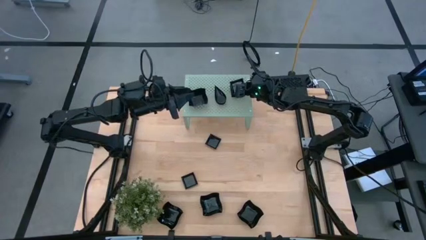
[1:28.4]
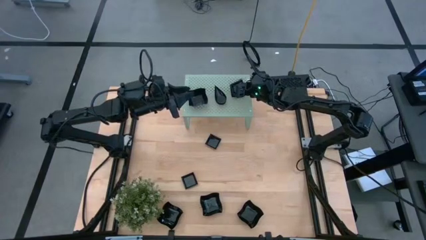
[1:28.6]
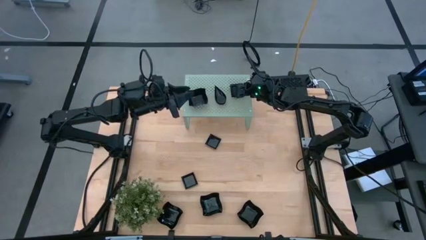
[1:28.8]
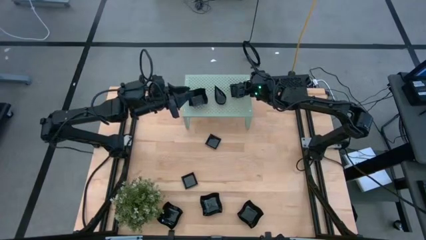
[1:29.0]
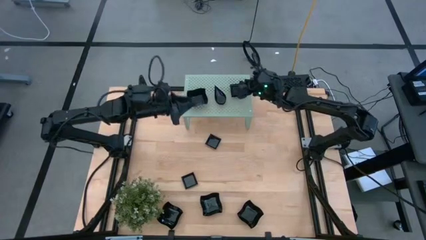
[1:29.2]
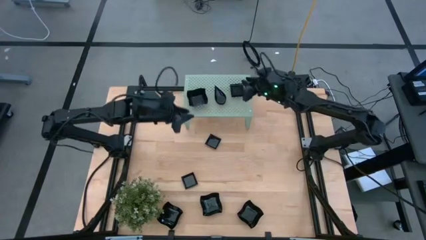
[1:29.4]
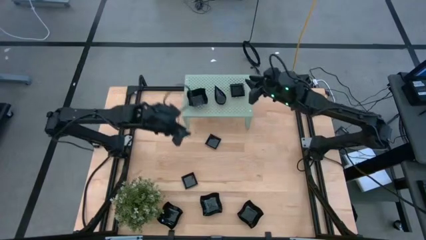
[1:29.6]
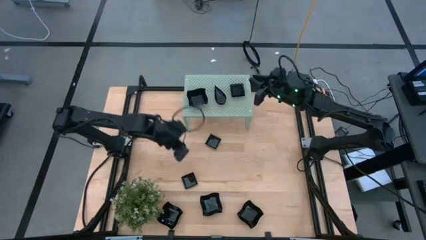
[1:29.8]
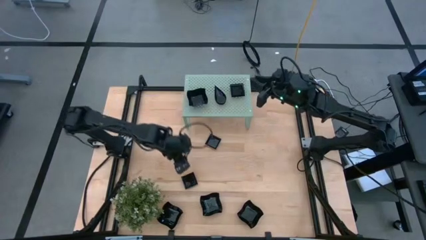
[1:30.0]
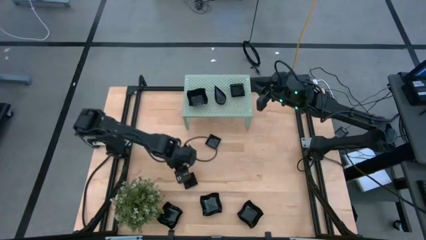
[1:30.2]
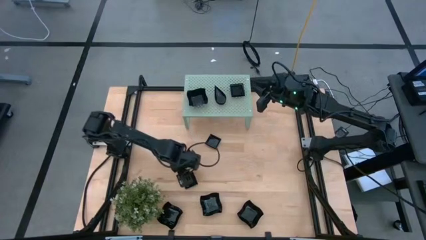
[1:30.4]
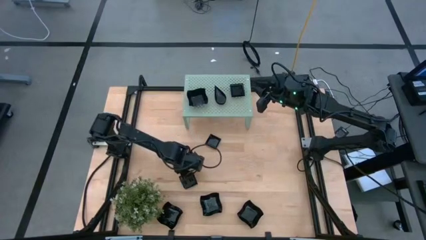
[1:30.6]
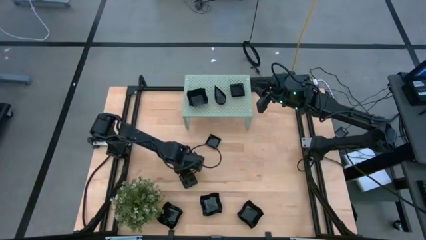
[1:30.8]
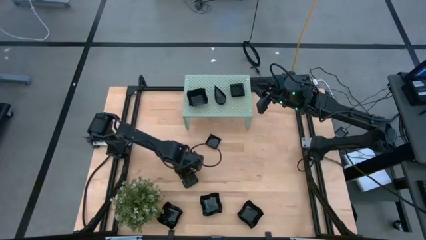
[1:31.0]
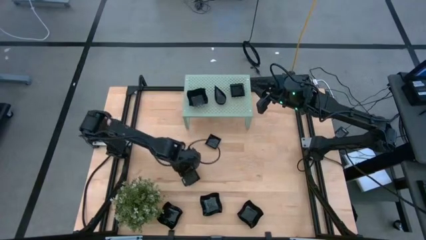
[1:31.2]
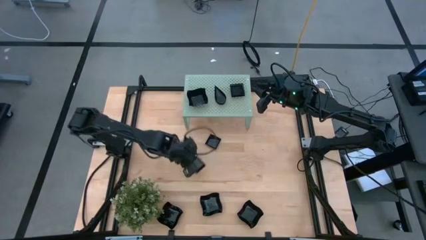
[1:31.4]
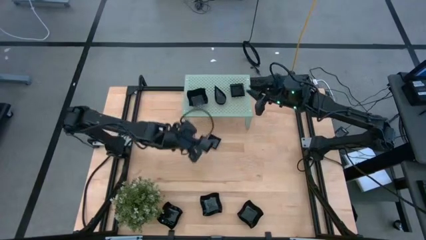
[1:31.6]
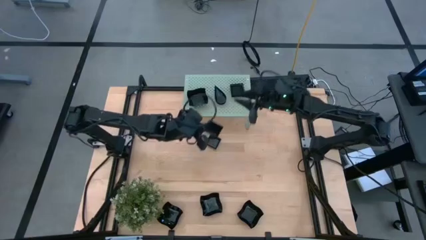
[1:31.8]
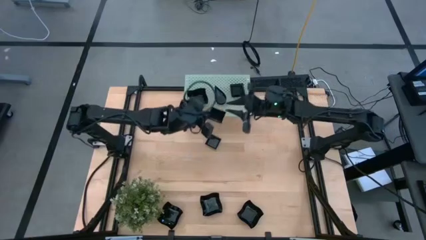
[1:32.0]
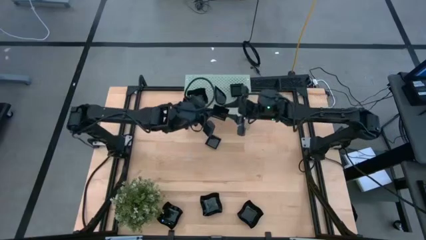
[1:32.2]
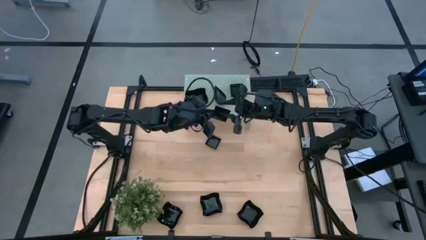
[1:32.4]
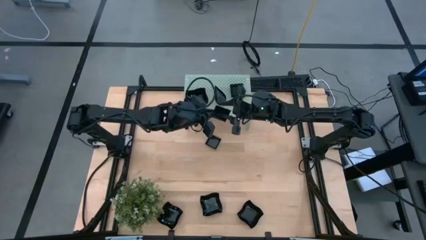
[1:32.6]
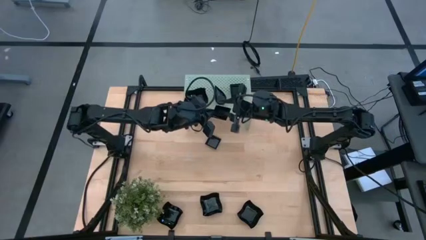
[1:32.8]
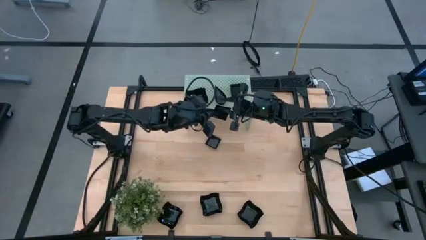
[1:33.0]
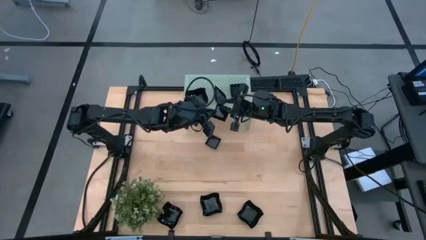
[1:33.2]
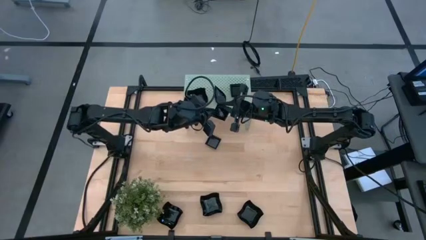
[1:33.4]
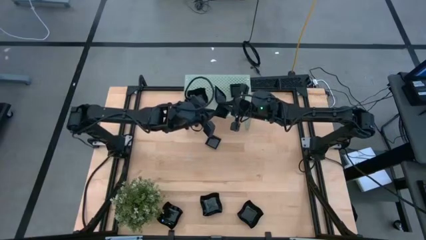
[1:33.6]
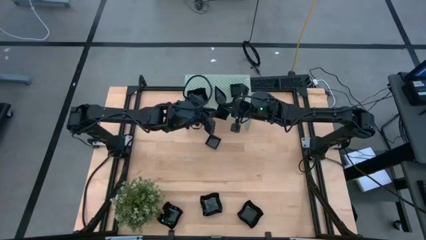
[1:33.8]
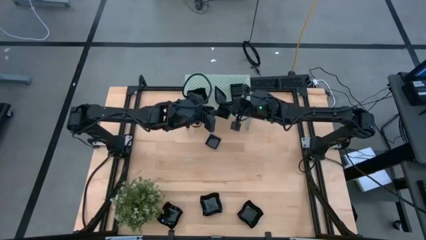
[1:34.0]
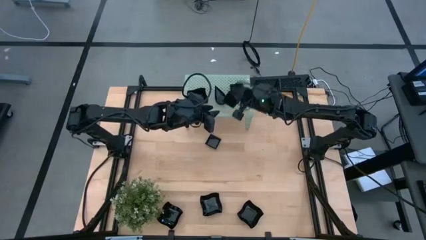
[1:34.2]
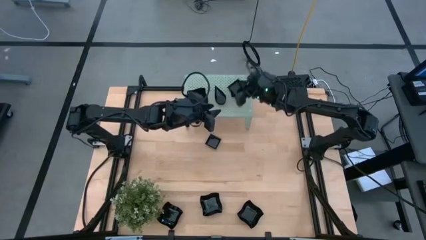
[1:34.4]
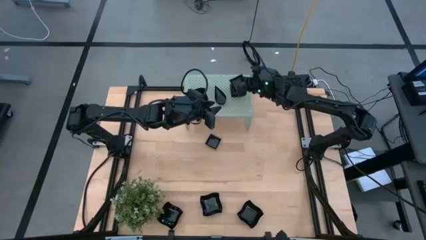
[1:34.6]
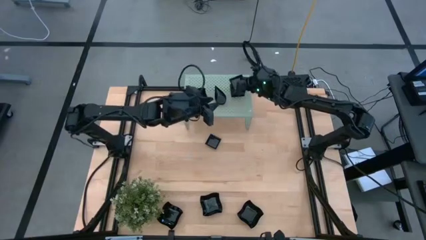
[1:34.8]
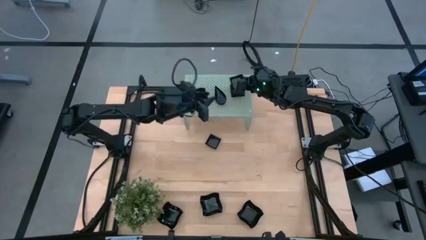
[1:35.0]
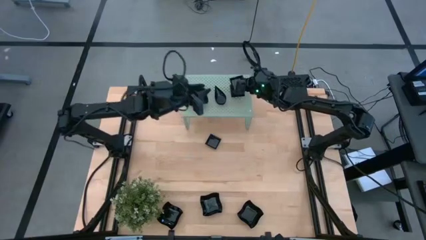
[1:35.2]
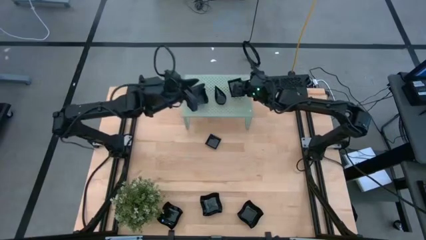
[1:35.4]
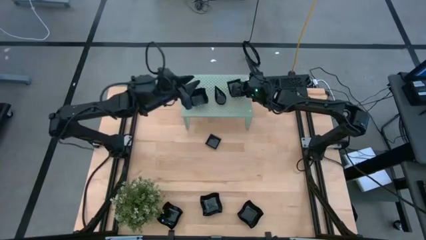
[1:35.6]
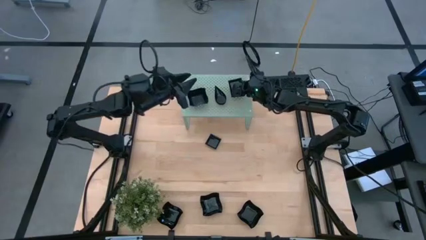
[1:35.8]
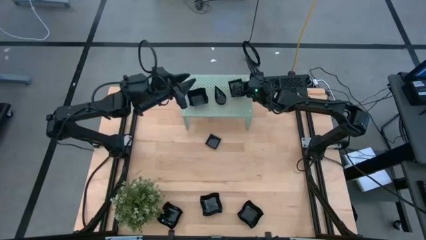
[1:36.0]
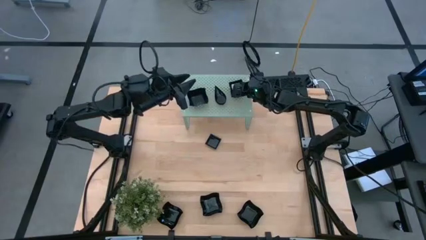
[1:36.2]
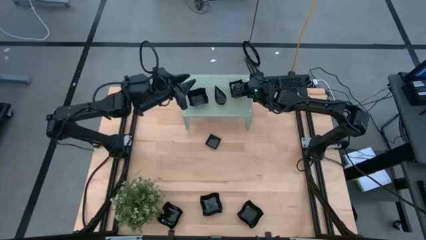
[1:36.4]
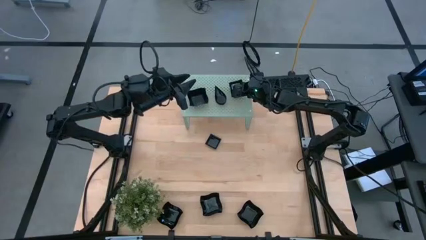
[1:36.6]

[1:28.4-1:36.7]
Task: Pick & Place Mini shaped plates
Stack the black square plate on the shelf

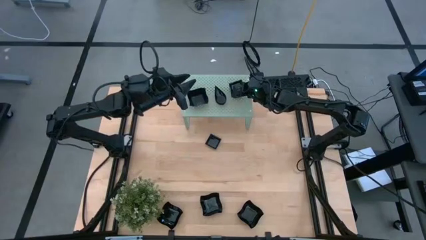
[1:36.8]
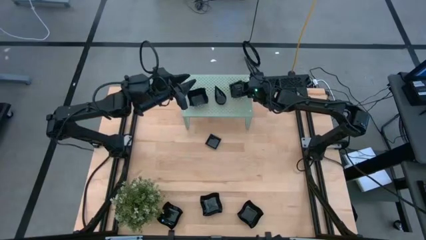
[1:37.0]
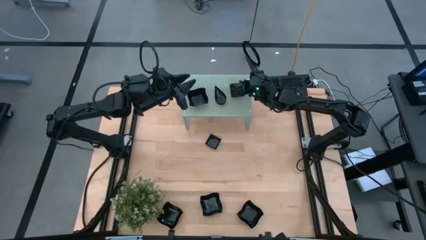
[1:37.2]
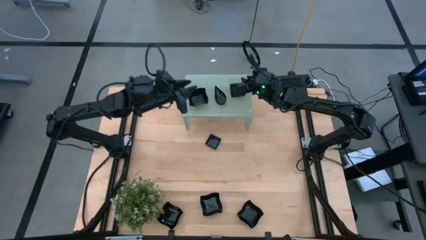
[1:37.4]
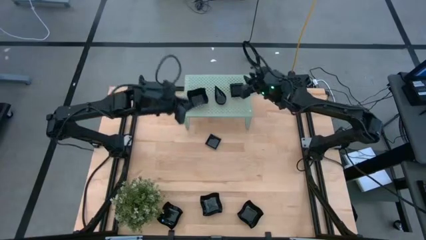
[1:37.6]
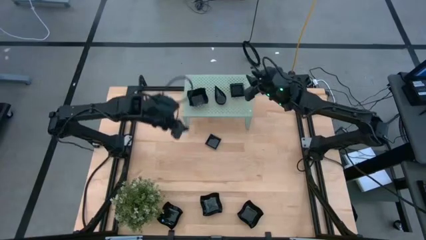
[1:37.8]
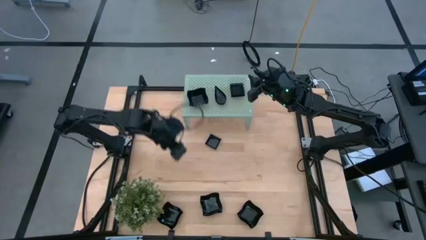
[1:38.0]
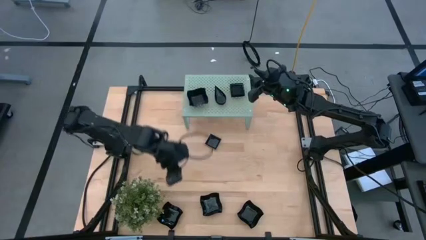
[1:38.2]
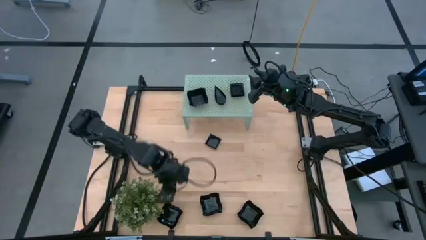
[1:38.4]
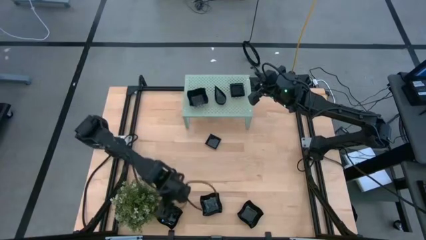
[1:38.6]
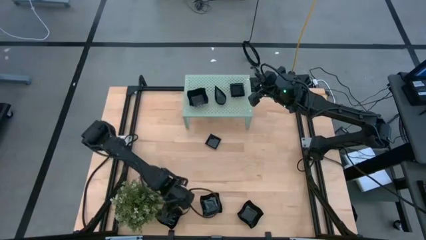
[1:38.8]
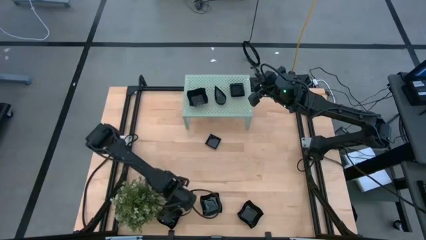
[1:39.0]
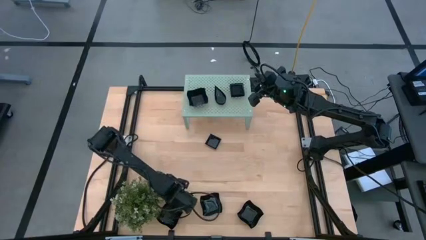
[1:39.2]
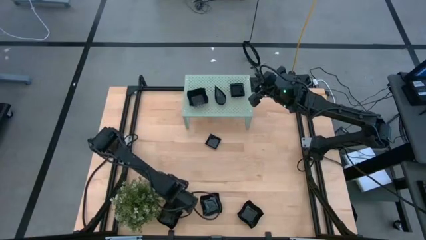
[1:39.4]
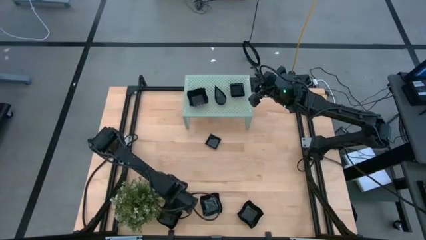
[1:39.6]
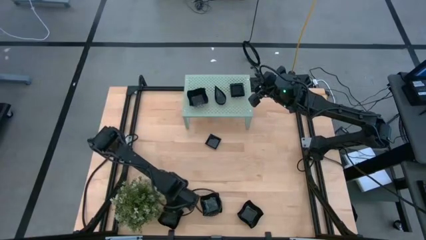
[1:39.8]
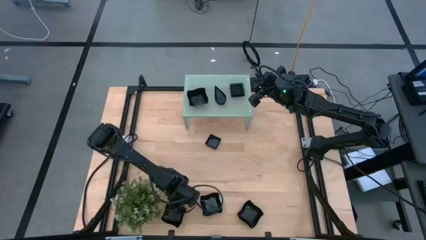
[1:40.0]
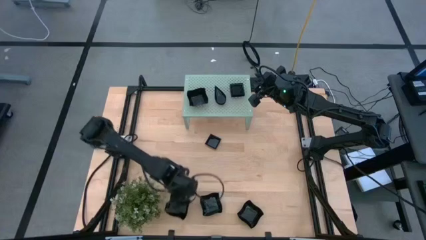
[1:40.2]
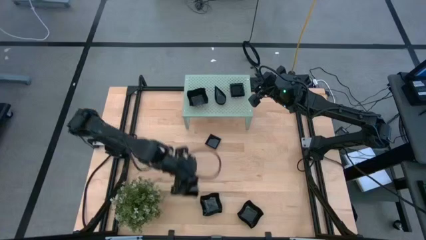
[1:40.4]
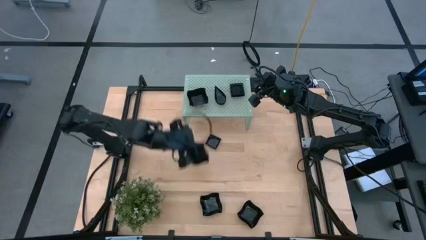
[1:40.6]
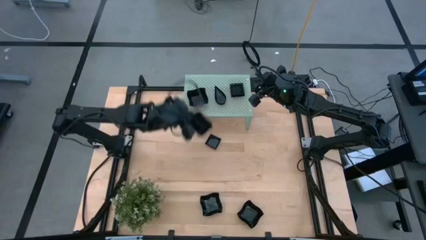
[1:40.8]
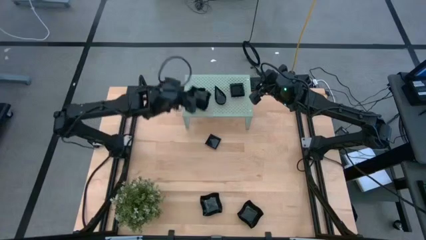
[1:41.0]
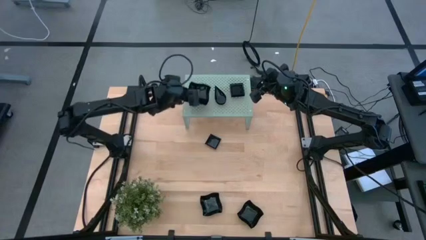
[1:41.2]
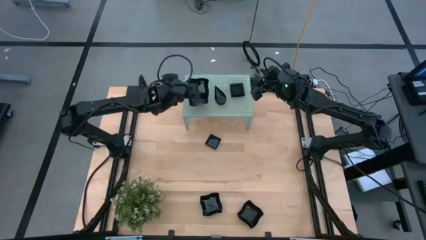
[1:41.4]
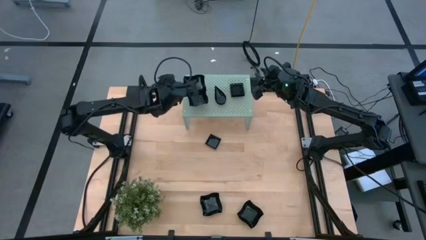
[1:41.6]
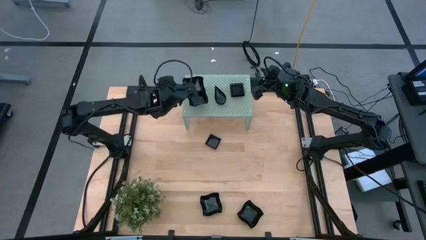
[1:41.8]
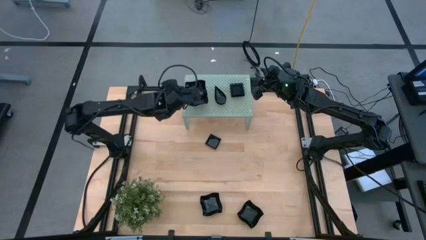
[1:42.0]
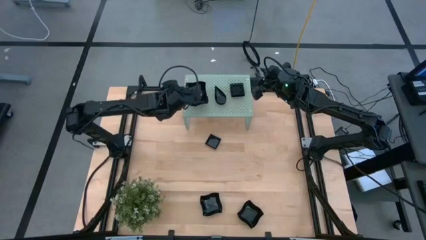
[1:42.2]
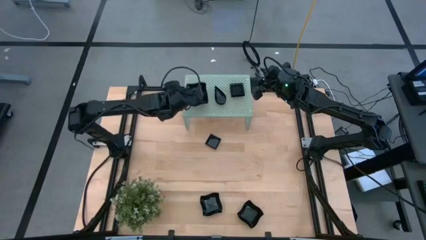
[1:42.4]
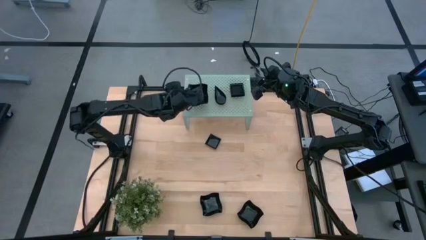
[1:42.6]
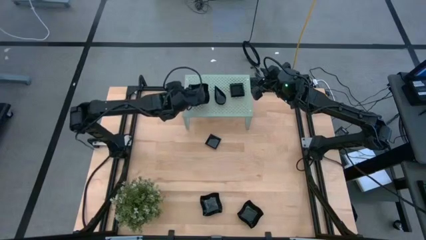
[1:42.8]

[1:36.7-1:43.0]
Stack the black distorted square plate on the shelf

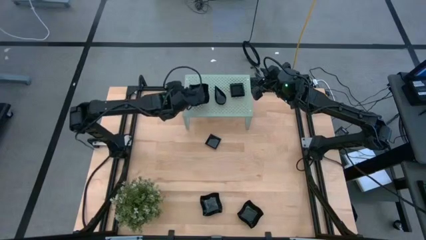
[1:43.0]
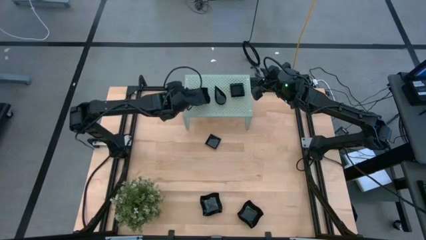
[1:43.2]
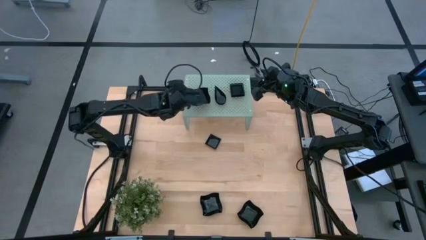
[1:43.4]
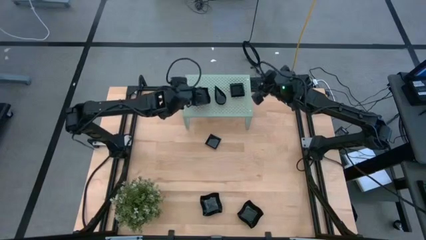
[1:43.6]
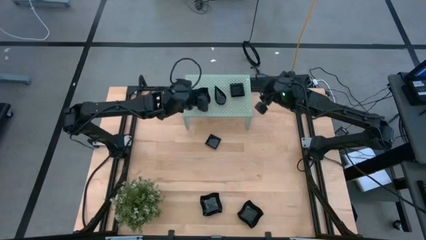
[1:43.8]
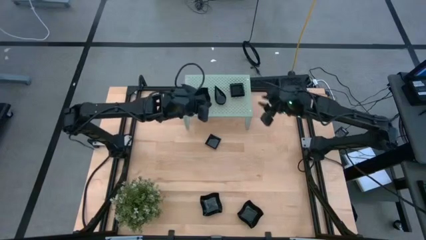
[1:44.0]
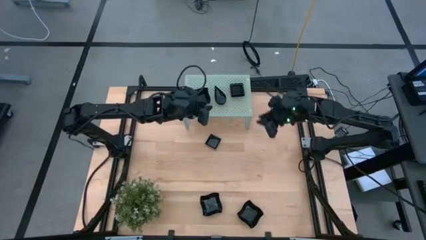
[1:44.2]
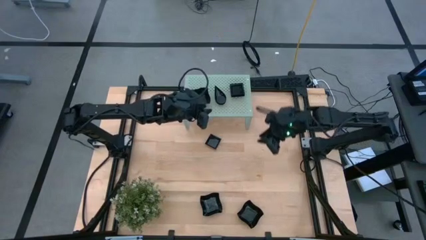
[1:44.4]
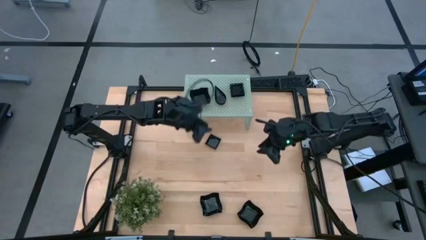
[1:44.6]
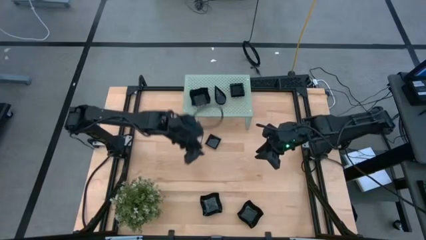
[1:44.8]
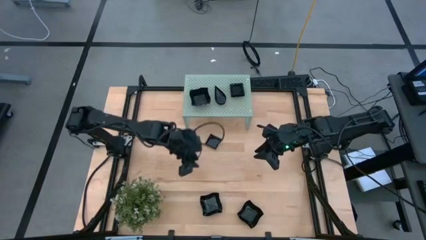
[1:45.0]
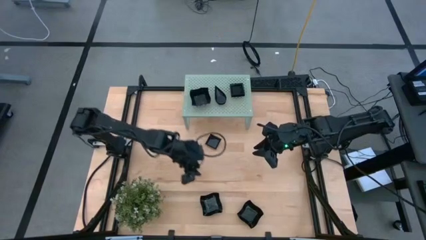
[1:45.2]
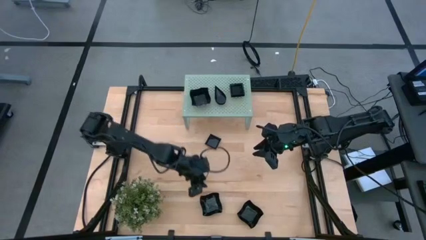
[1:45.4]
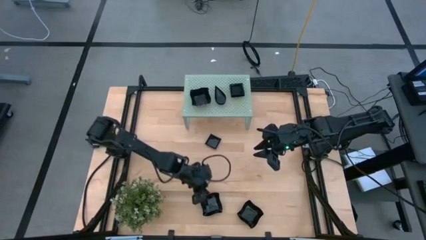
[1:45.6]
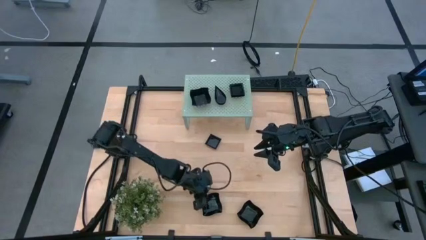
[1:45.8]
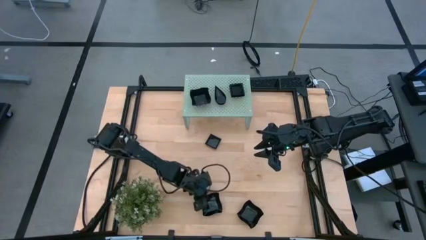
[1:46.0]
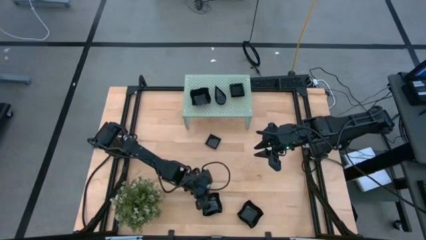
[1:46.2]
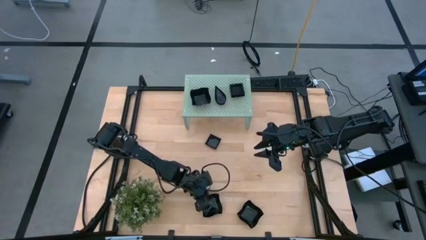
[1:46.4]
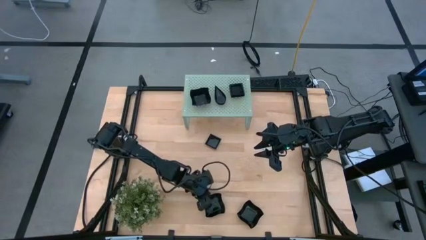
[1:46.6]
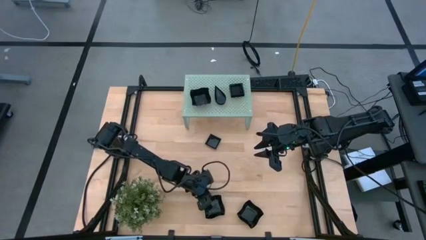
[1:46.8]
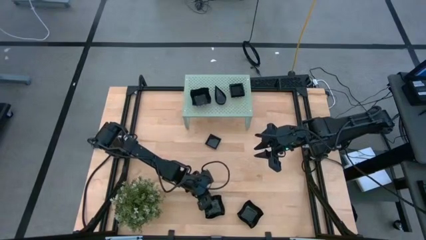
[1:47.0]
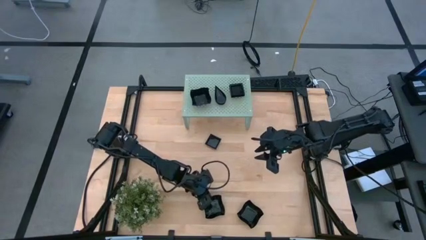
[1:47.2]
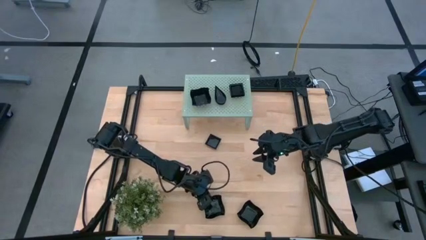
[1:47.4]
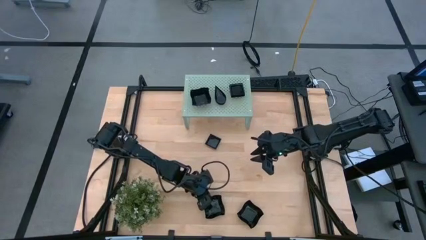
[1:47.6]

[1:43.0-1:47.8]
Stack the black distorted square plate on the shelf
